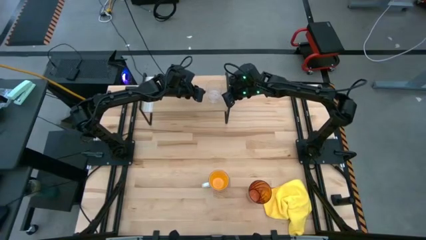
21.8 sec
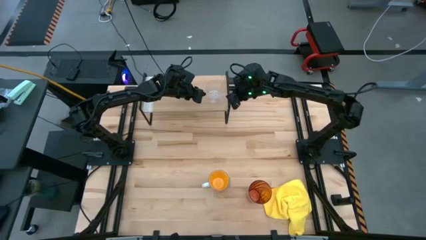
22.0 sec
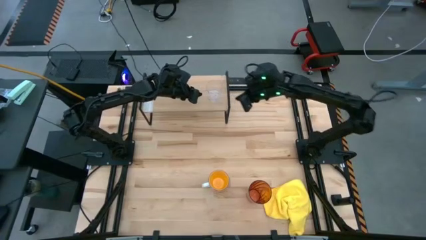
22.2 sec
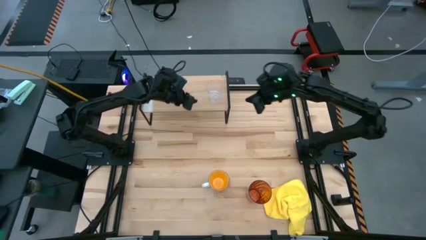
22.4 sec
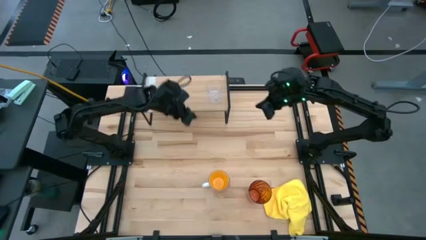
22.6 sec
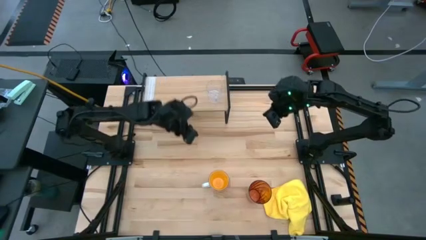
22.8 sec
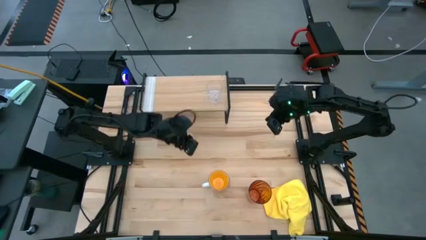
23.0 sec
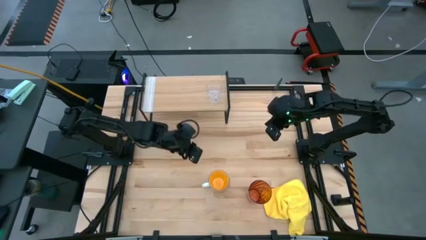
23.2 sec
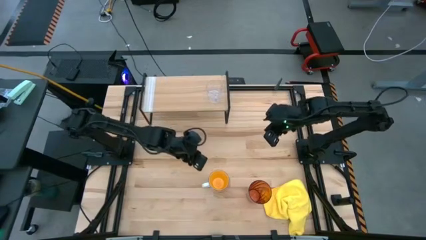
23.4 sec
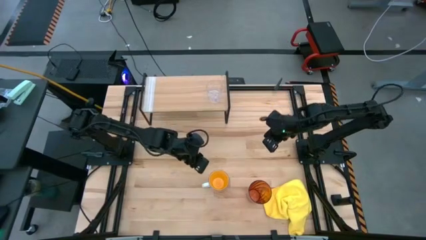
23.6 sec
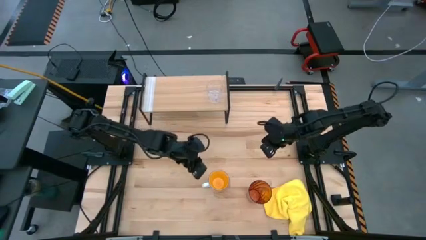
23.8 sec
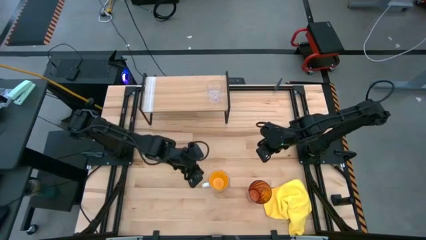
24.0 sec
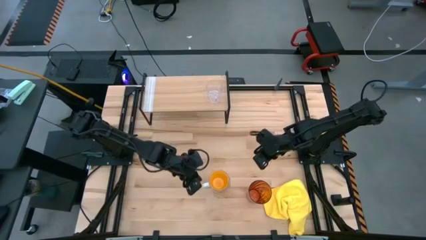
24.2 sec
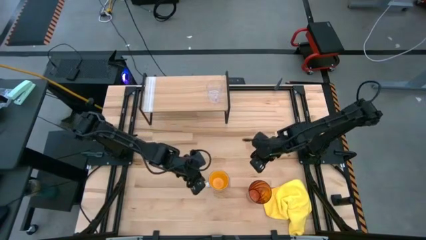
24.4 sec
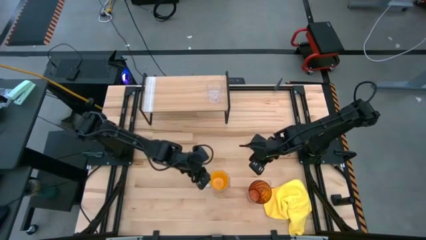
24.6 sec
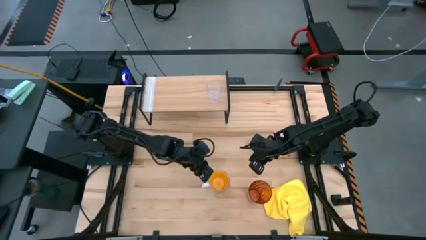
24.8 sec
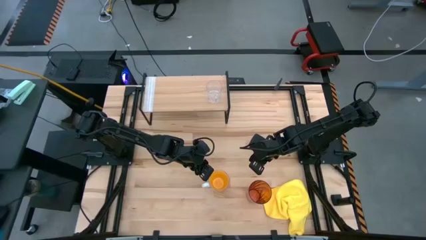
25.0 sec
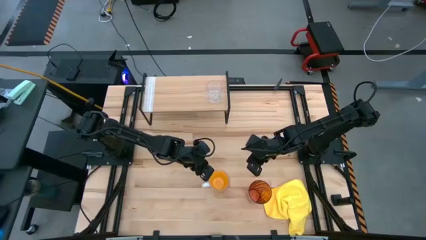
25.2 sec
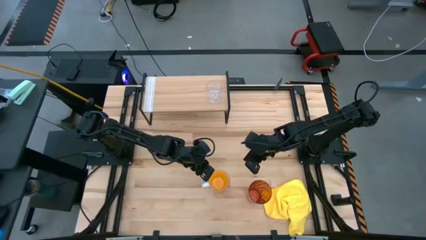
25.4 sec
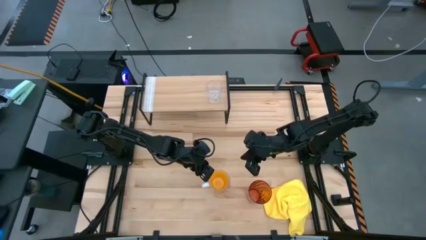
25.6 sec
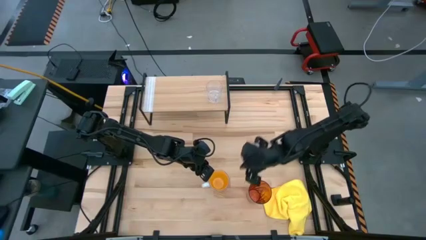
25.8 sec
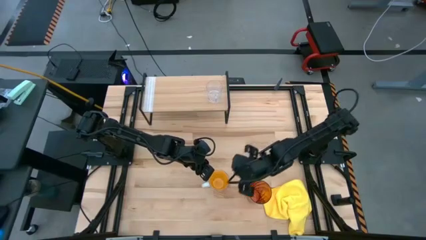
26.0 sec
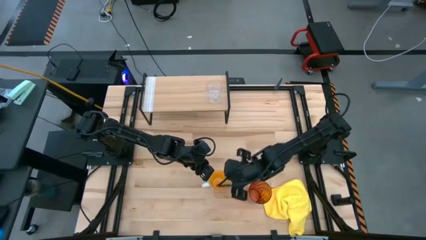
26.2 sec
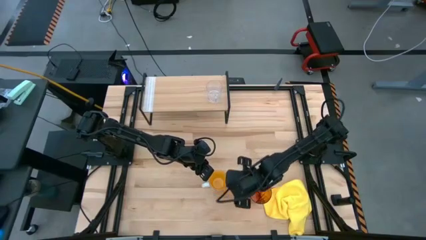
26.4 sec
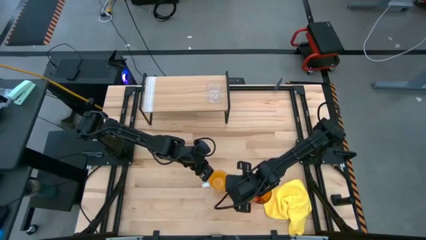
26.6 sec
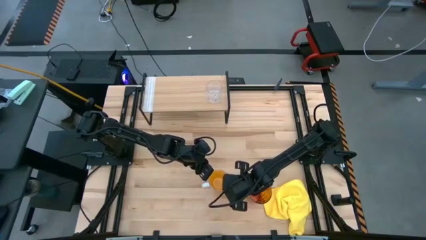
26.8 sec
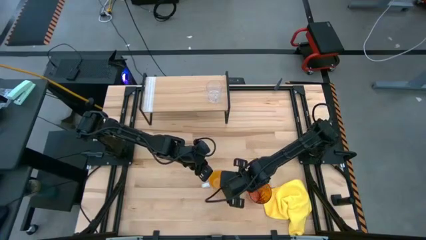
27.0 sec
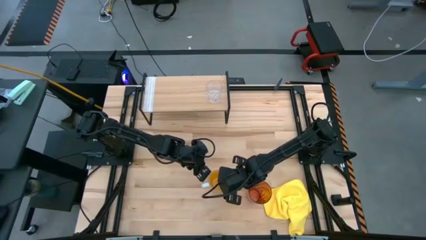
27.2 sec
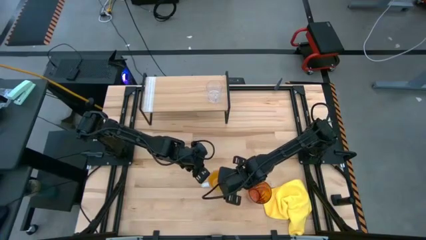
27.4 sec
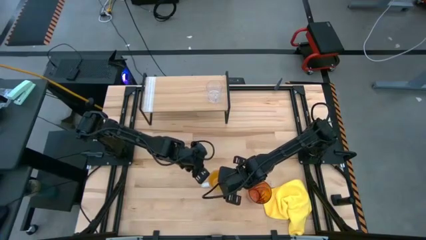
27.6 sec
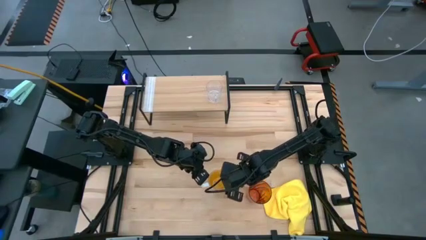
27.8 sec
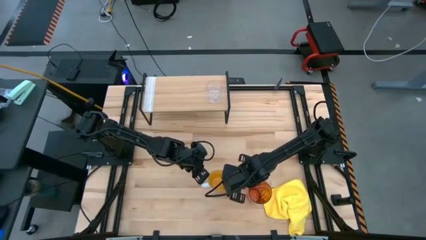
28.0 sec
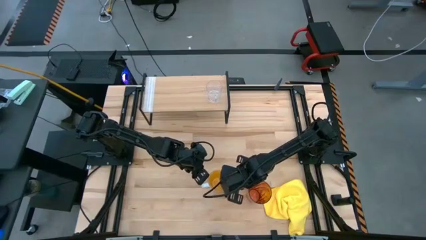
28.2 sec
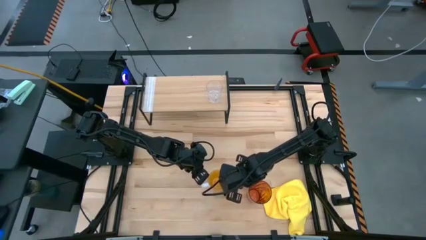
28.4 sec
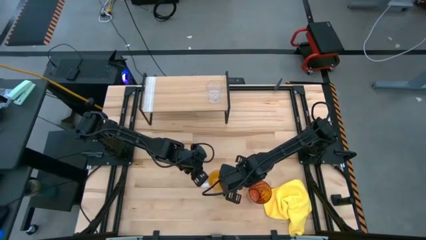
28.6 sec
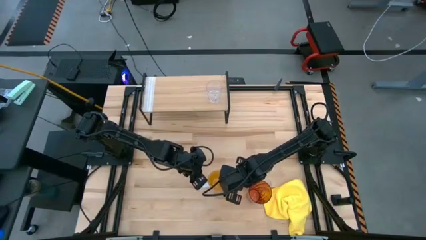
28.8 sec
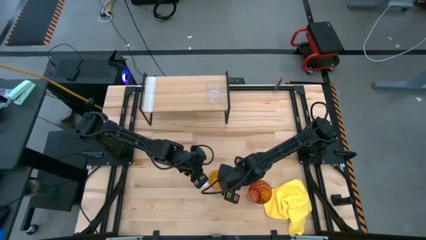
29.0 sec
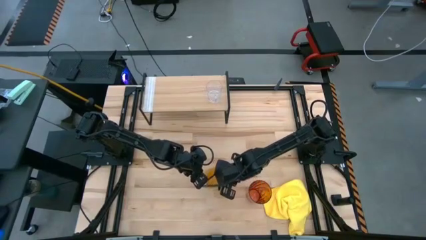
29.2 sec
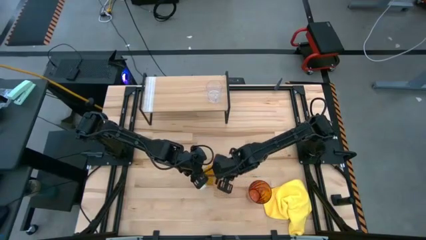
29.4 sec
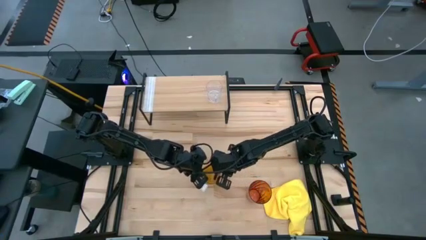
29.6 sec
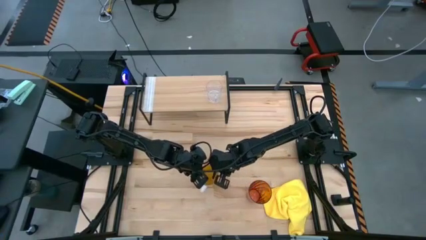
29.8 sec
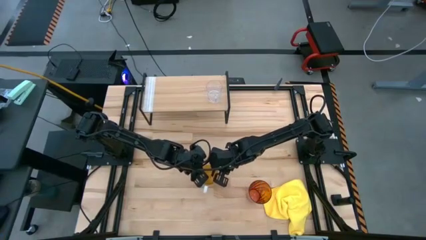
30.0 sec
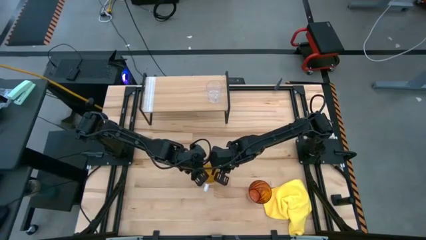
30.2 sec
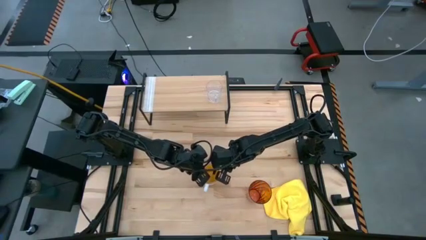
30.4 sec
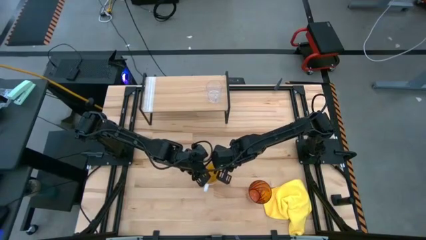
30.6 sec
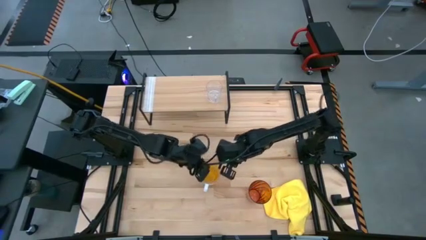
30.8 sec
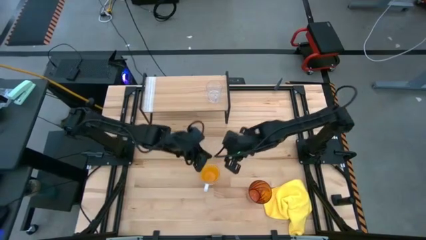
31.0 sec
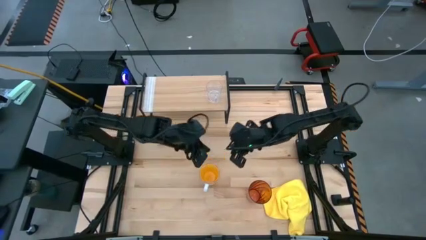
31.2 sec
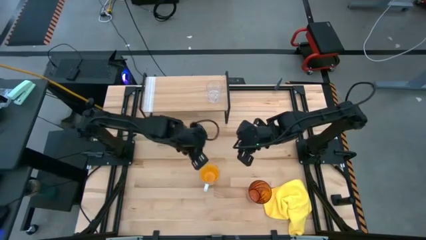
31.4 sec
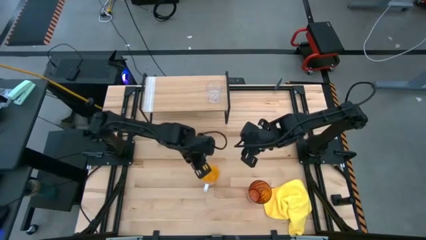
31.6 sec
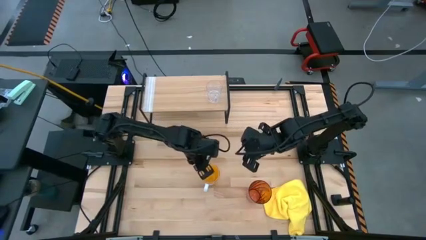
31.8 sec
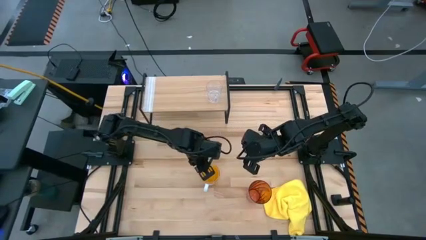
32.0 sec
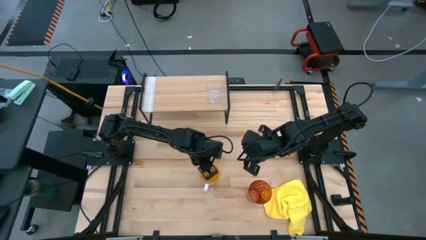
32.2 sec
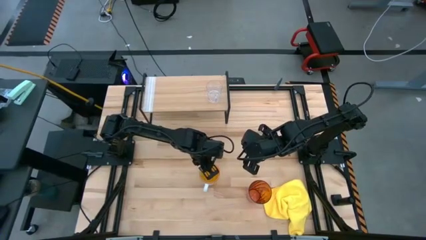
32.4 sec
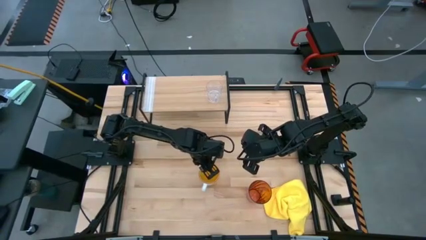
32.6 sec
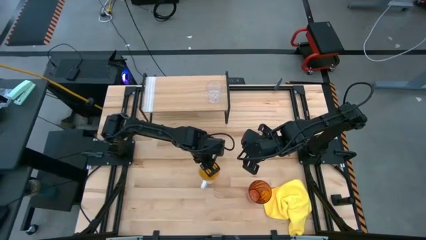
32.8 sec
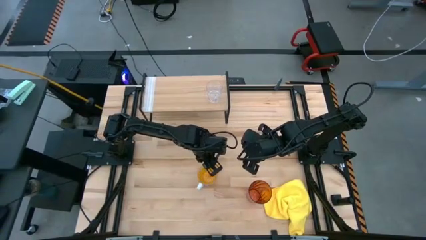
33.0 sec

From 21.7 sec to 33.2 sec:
Task: Stack small to large cups/mugs on shelf
Put the yellow mug on the shelf
